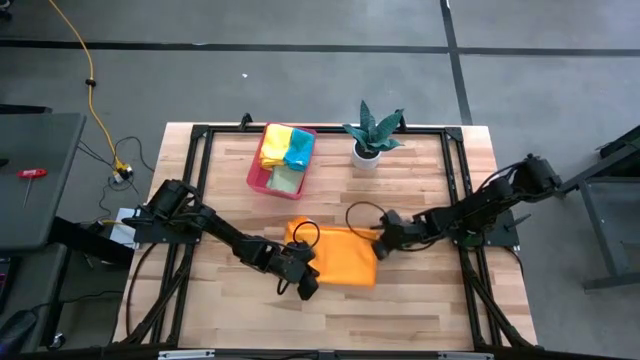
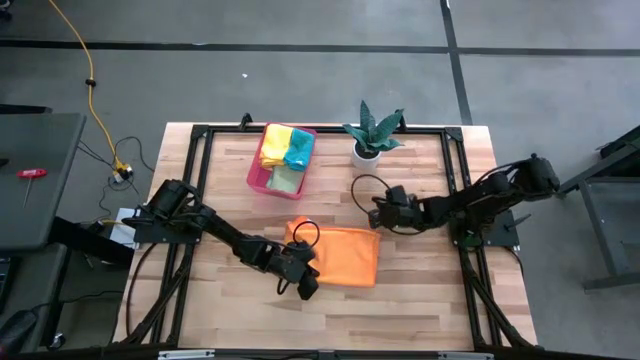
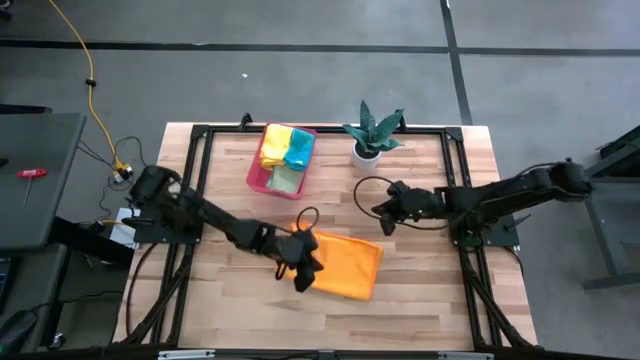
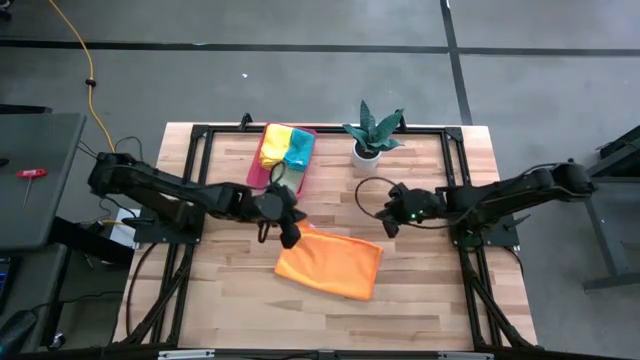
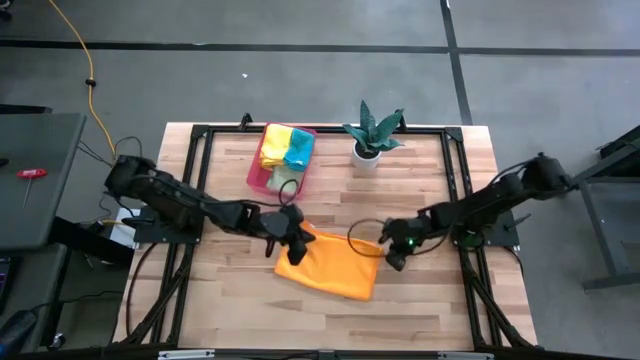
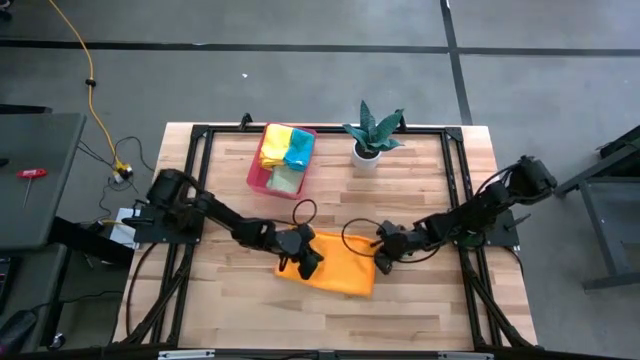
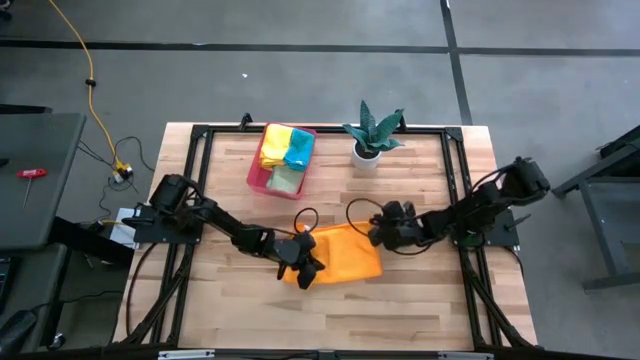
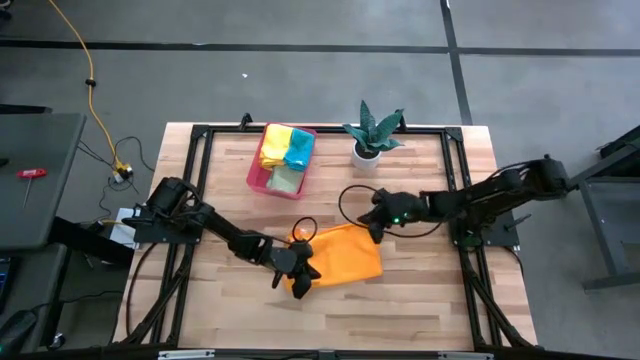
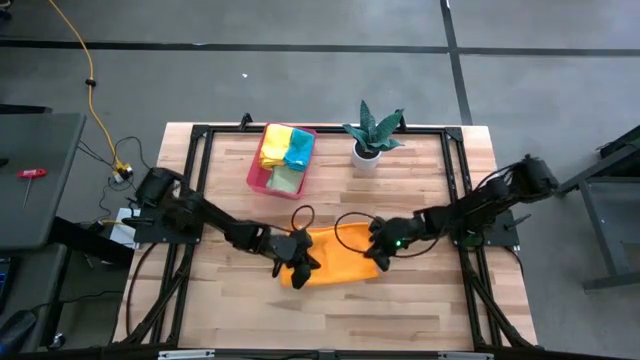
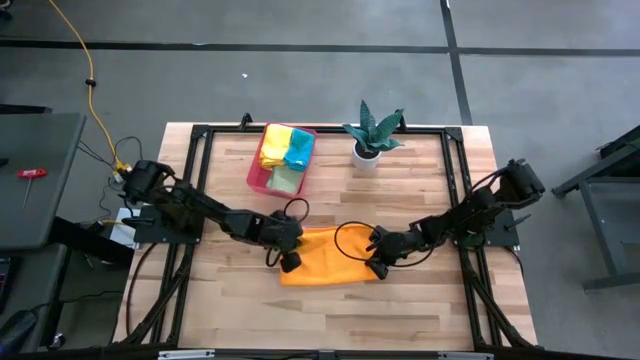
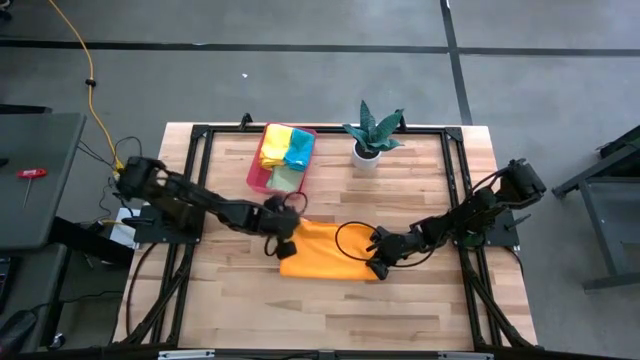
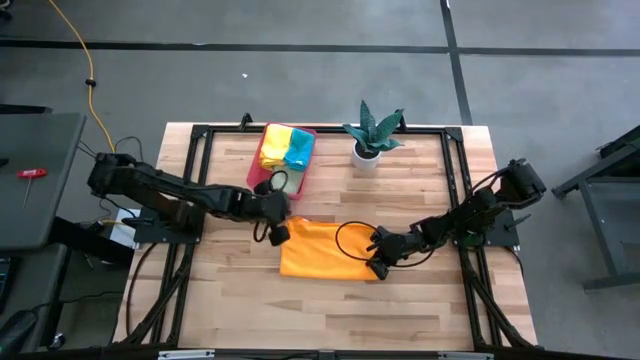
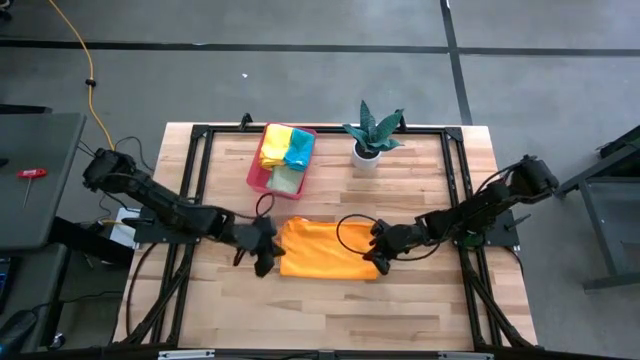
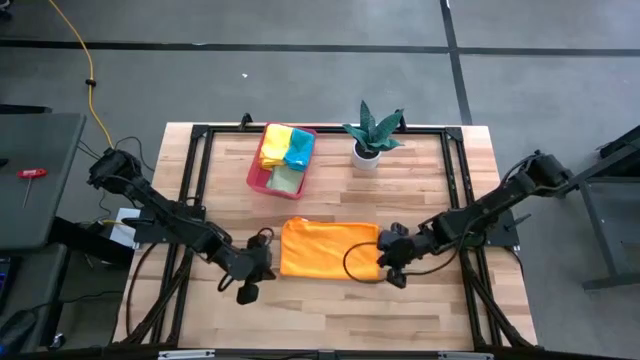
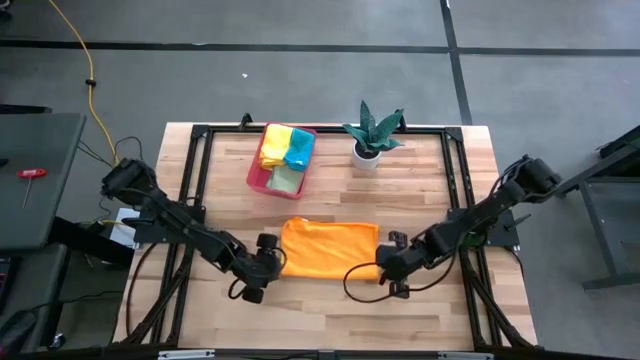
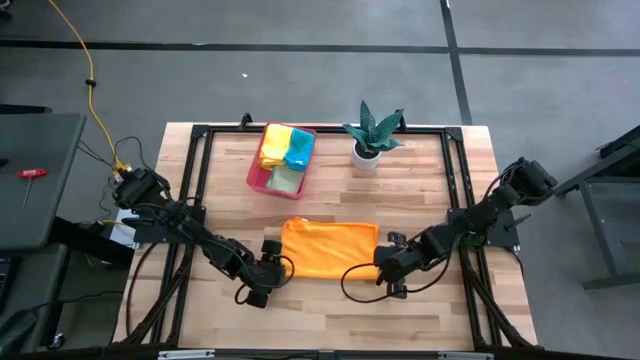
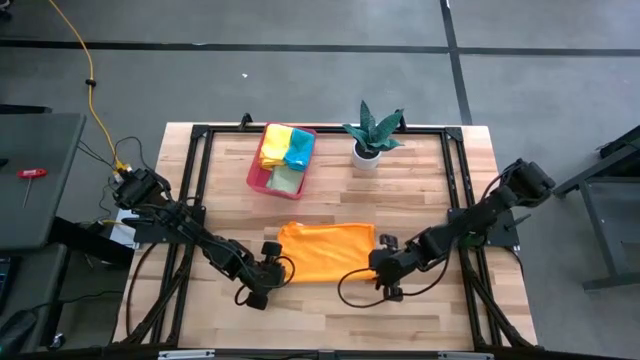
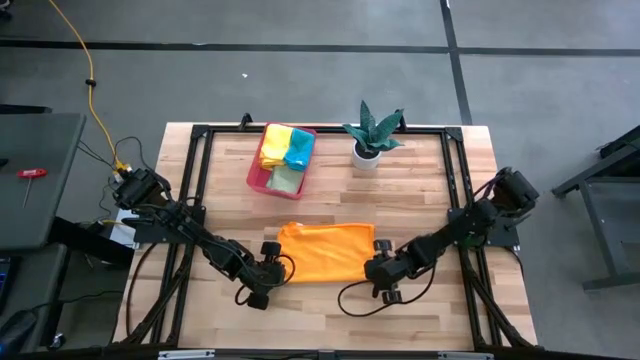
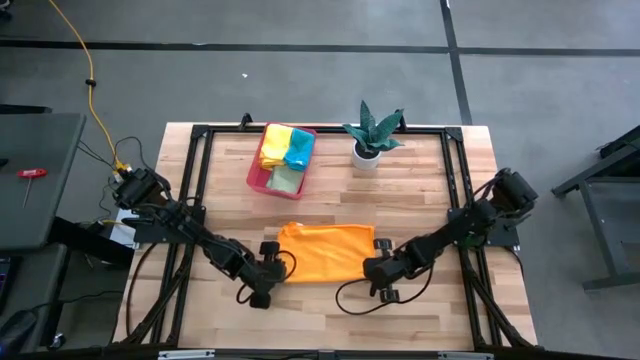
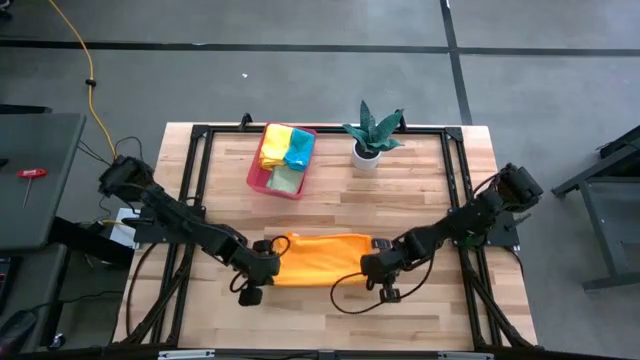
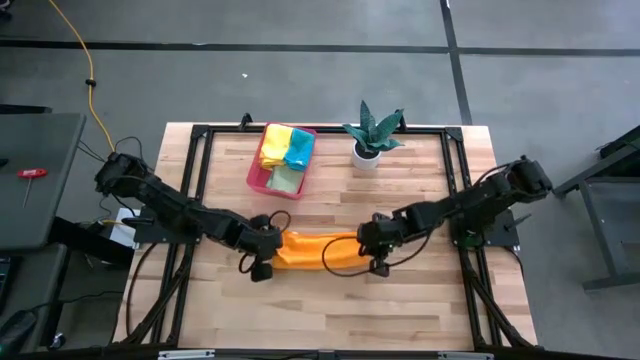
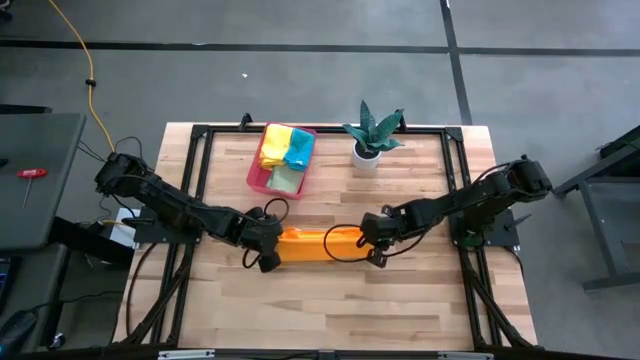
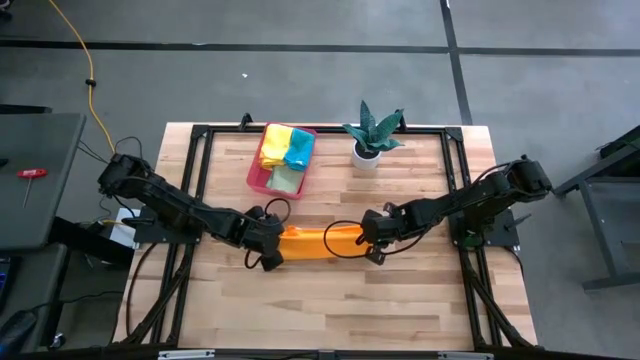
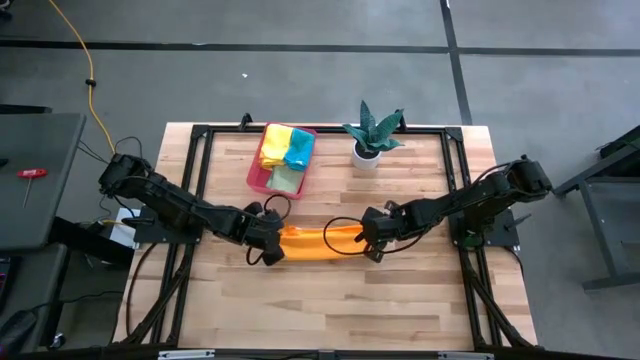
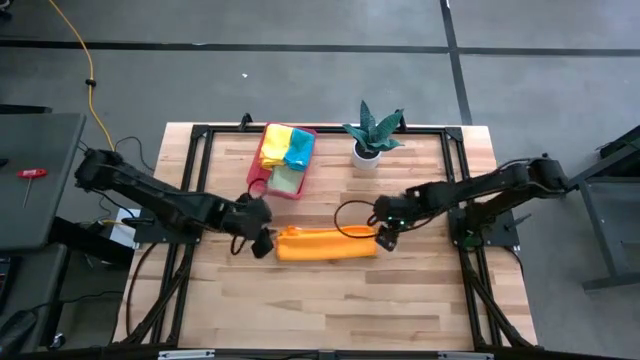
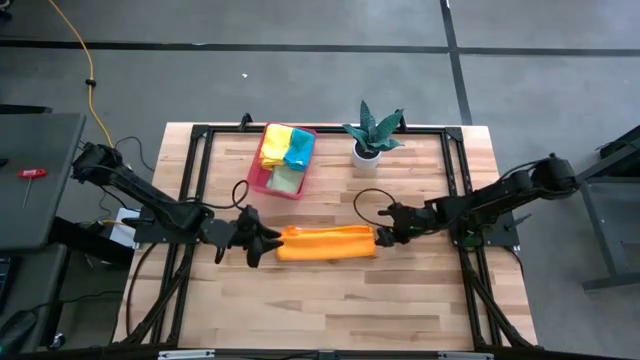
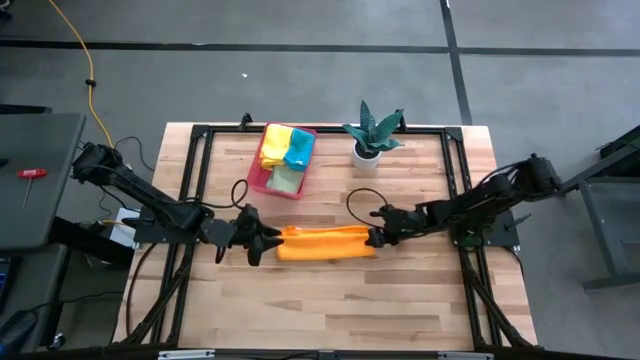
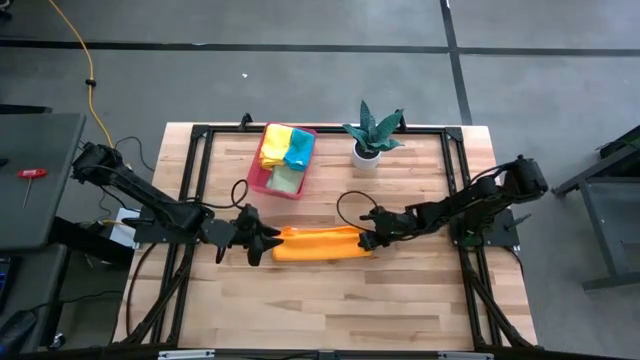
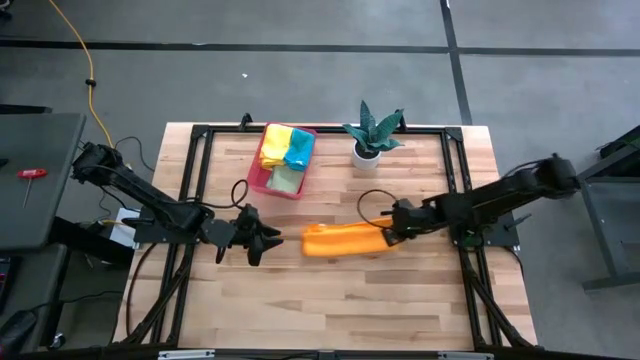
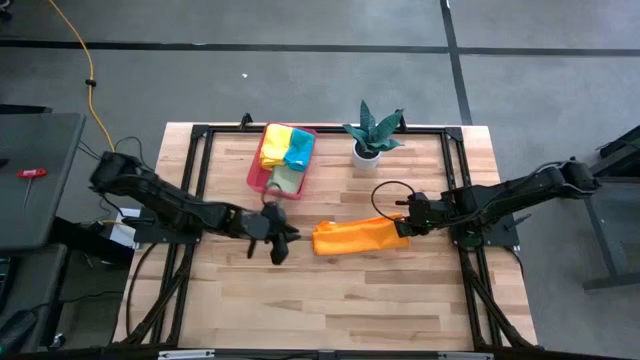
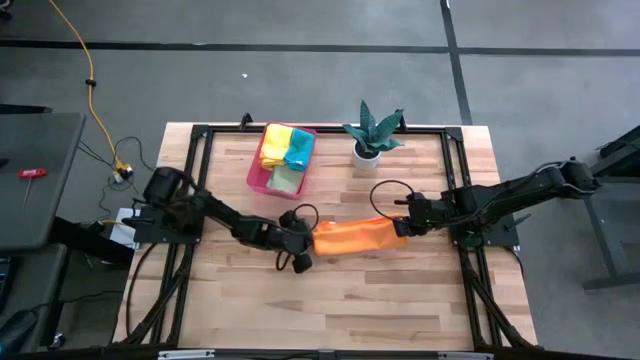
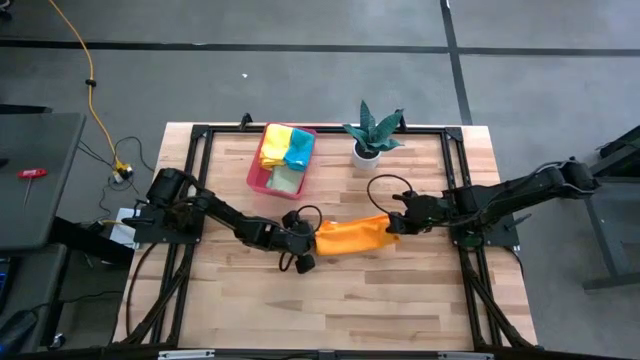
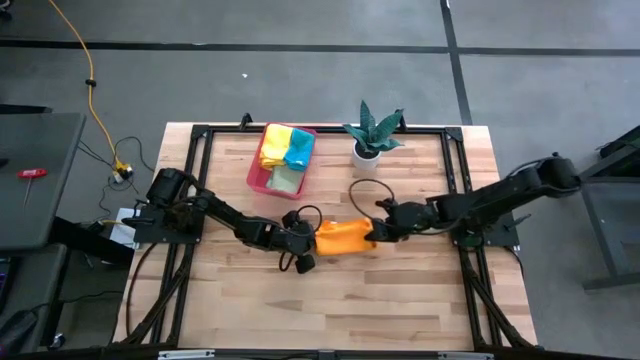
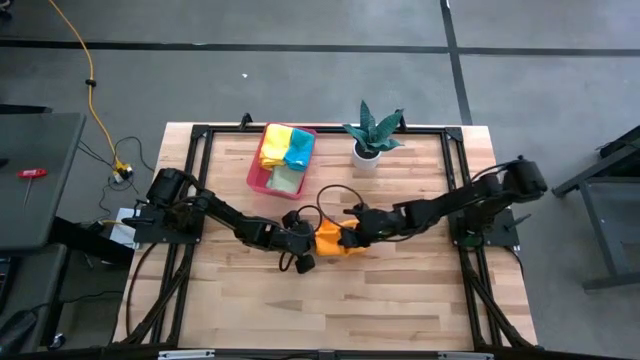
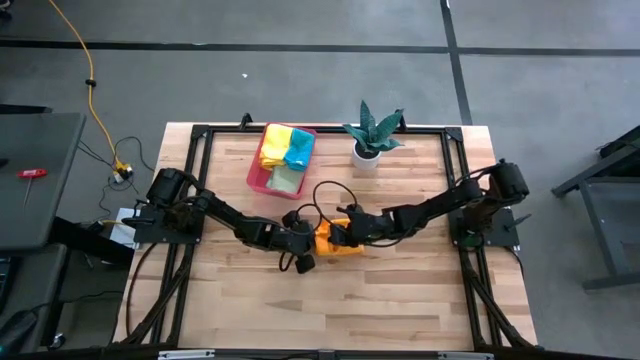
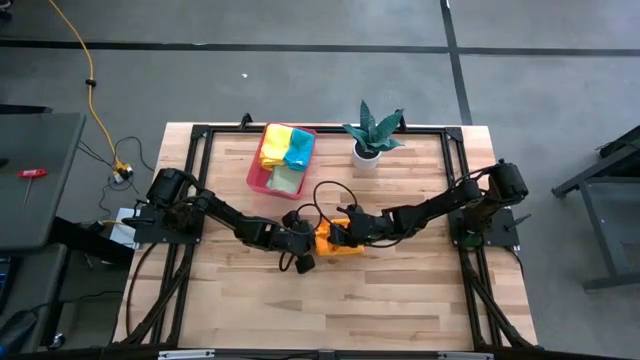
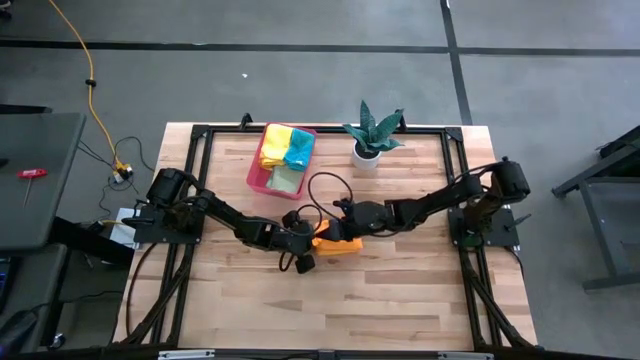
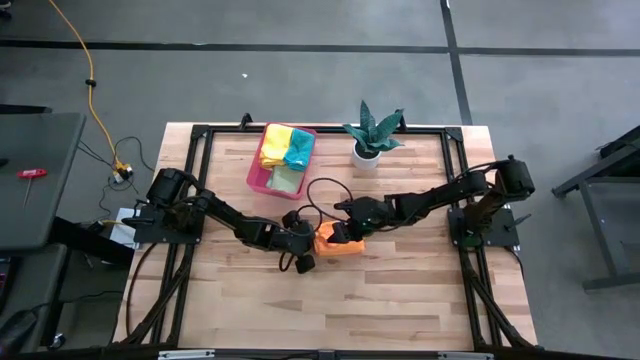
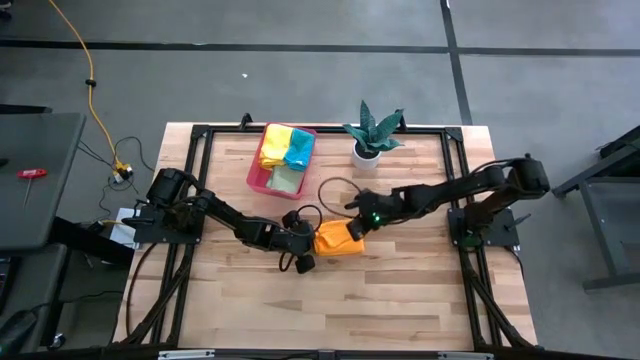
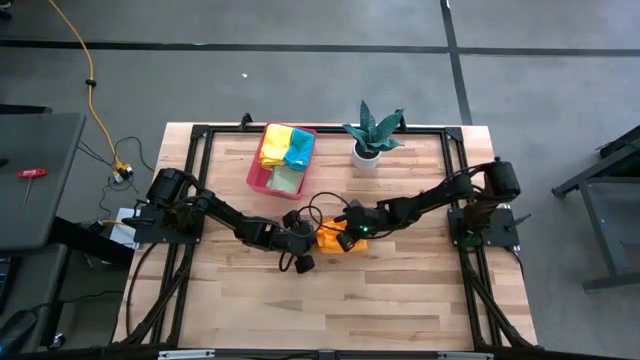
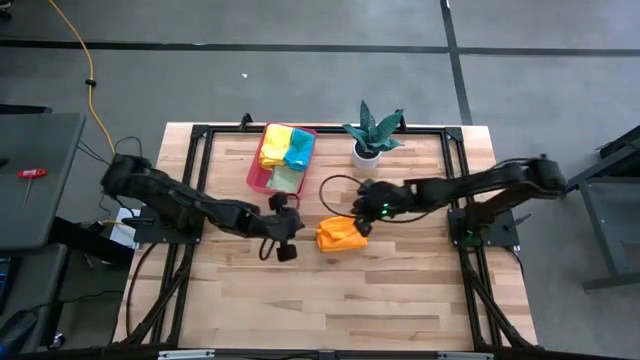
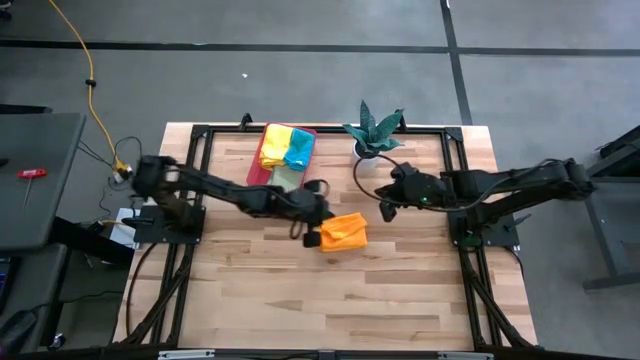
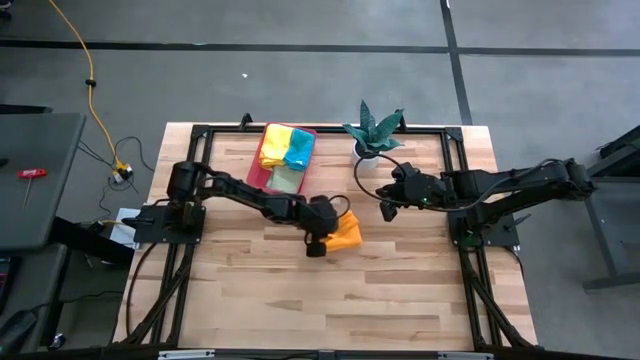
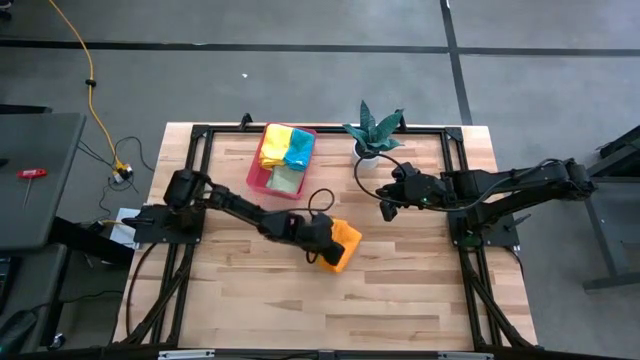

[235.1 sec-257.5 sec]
Task: Fold microfiber towels
Fold the orange microfiber cloth
